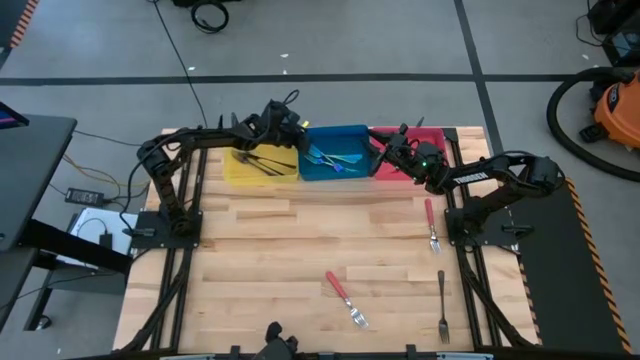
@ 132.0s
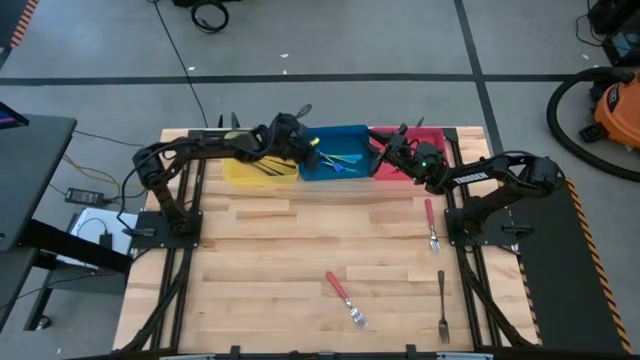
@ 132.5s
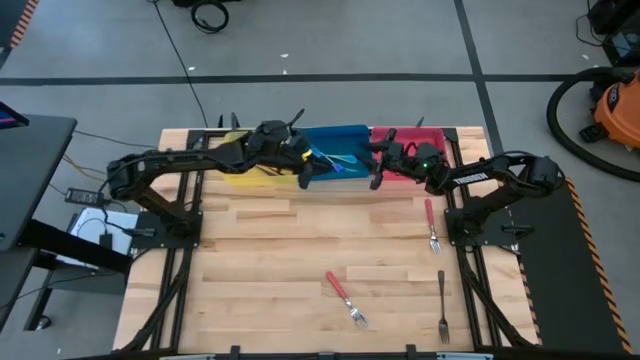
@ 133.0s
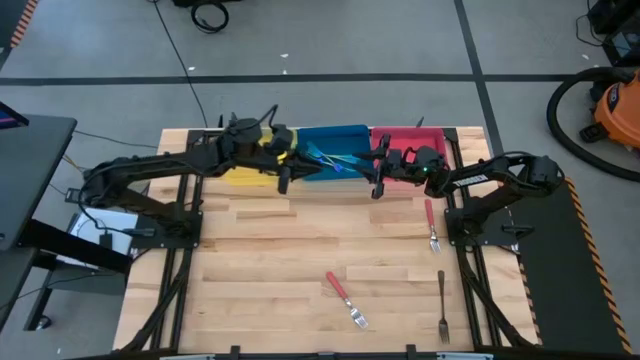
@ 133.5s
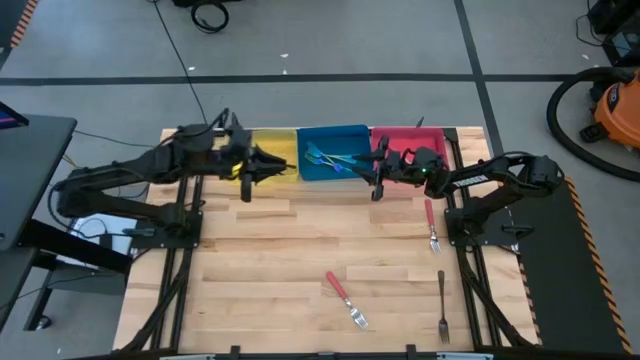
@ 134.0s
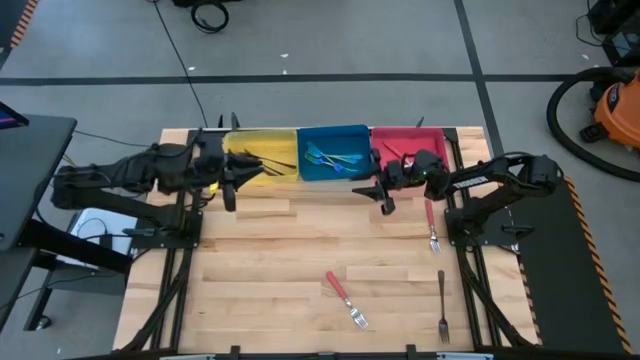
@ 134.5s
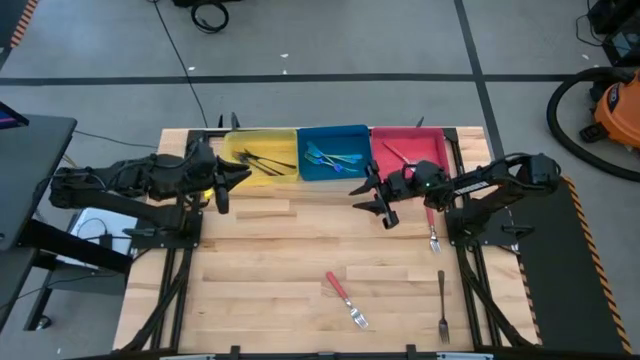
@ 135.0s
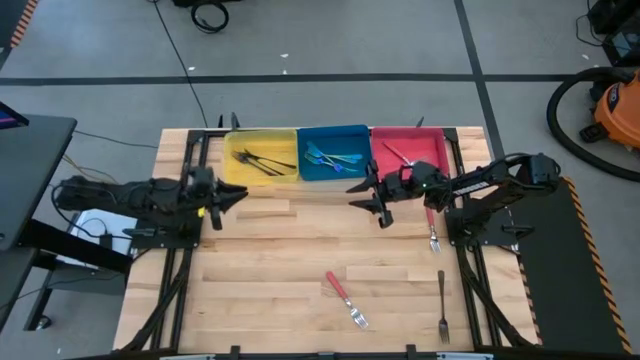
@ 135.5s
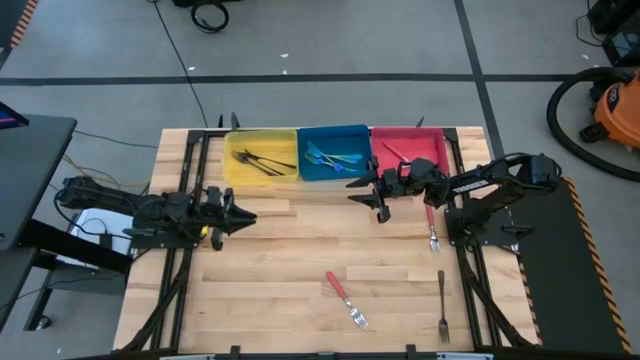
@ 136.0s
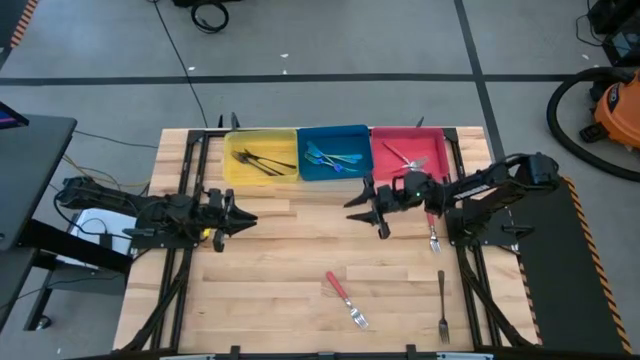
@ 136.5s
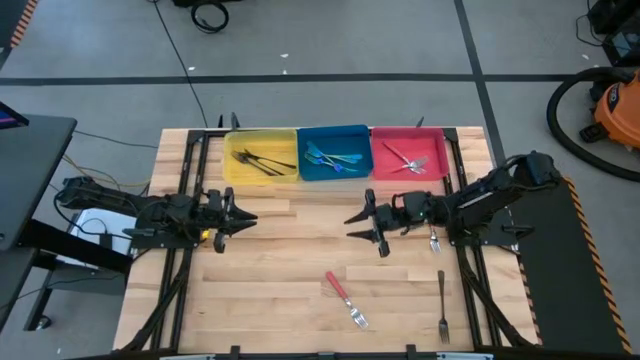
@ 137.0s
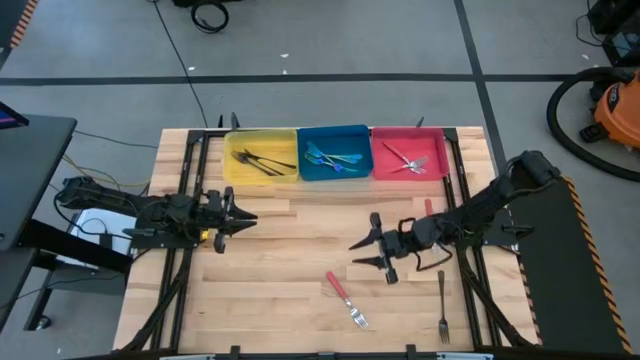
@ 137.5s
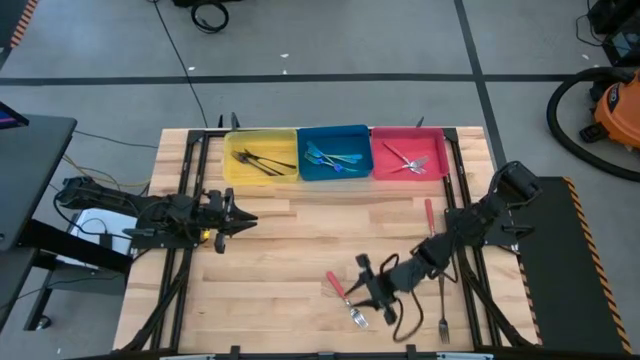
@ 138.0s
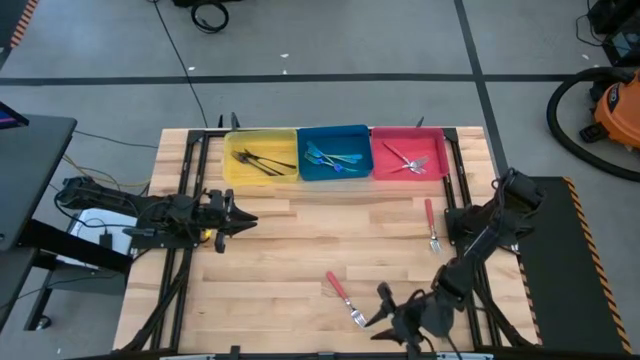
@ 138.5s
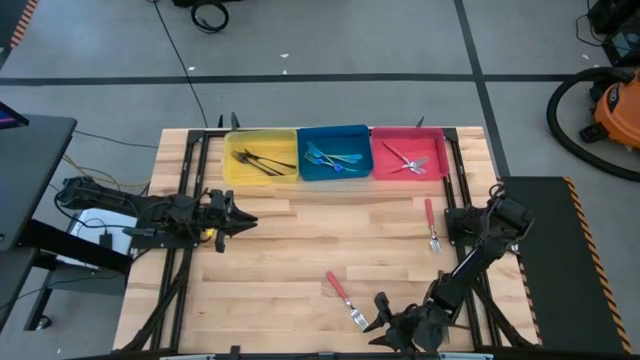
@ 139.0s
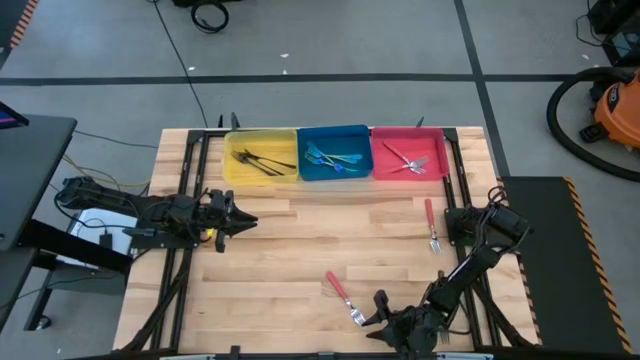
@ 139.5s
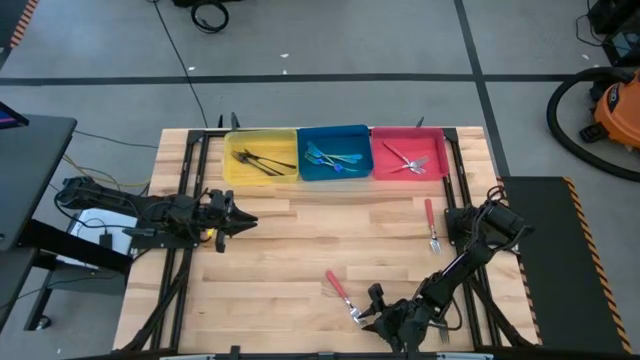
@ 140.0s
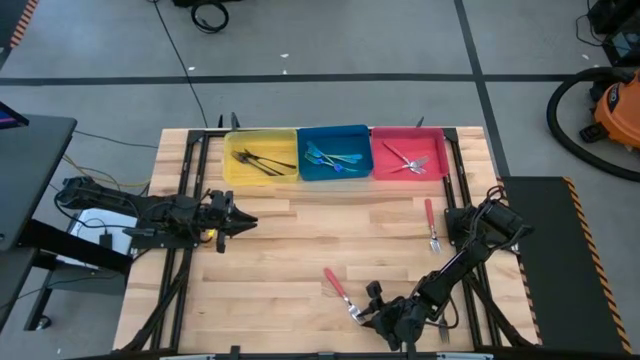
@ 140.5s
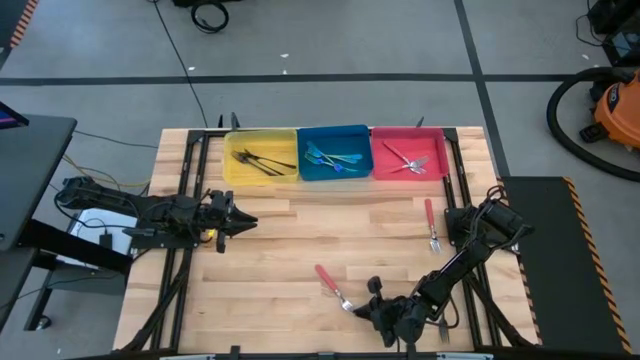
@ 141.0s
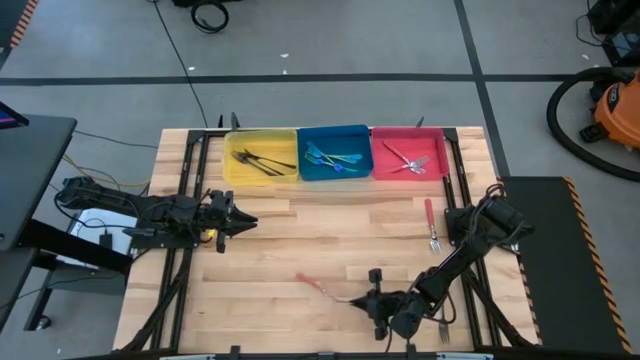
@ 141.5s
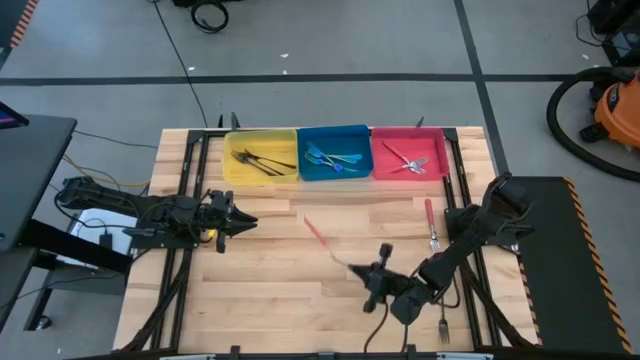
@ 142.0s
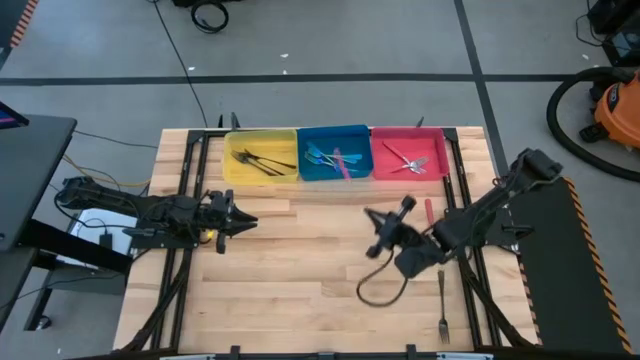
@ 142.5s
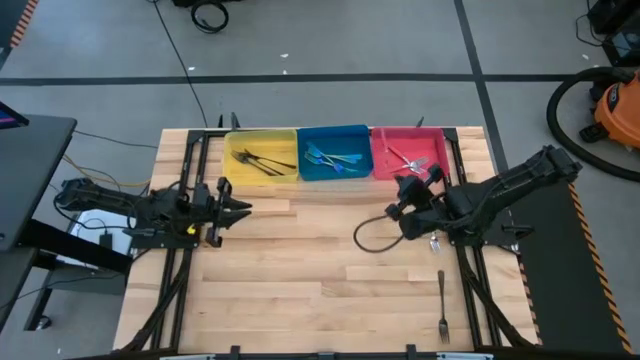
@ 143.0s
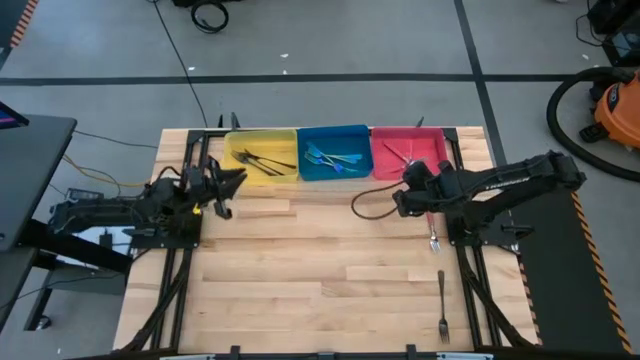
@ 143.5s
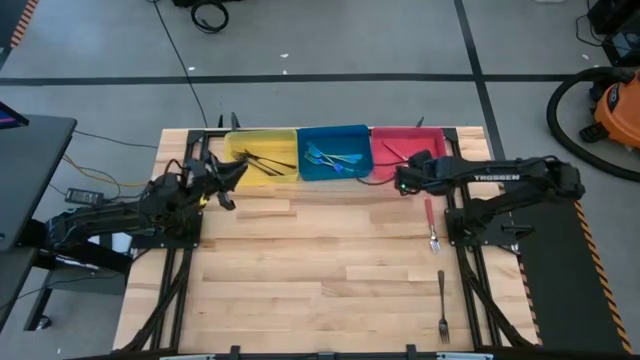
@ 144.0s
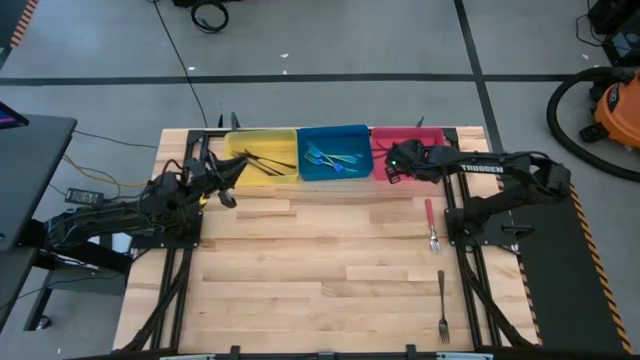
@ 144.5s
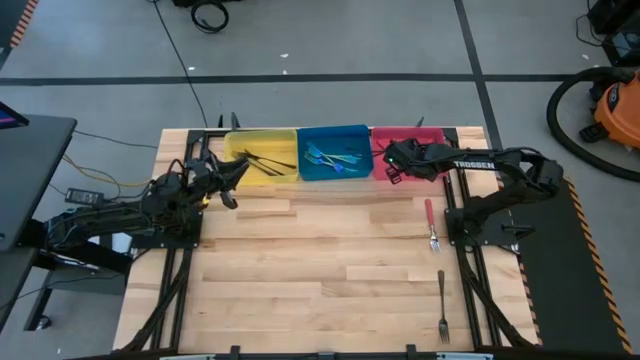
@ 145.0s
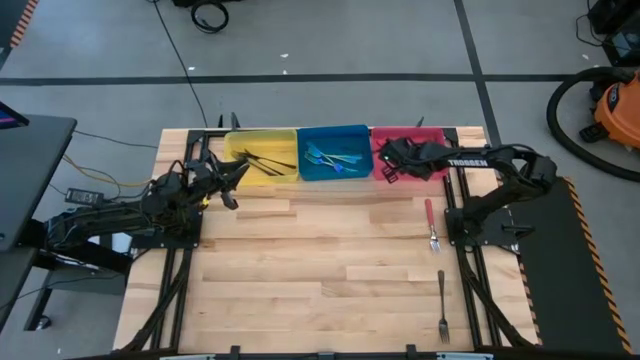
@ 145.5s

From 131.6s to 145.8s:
Task: Sort silverware by color (type)
Put the bottom pink fork into the red bin

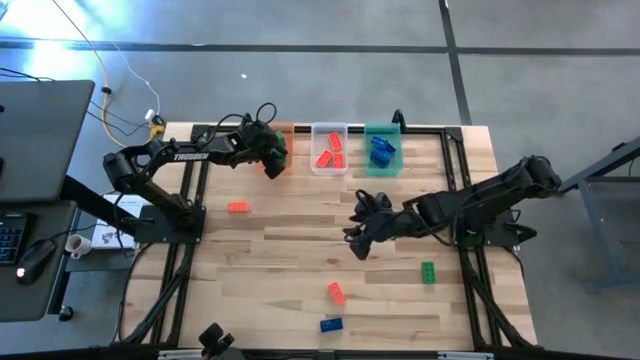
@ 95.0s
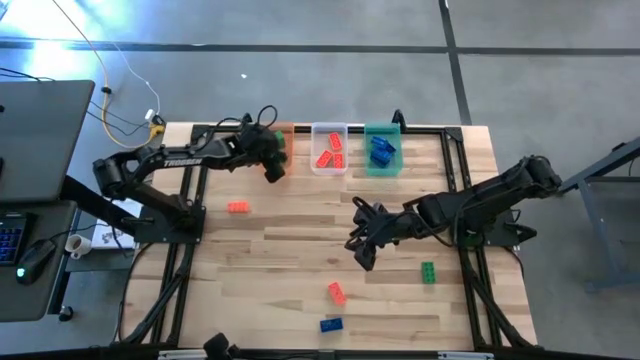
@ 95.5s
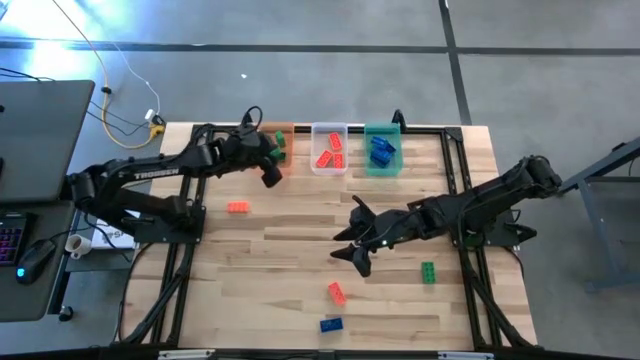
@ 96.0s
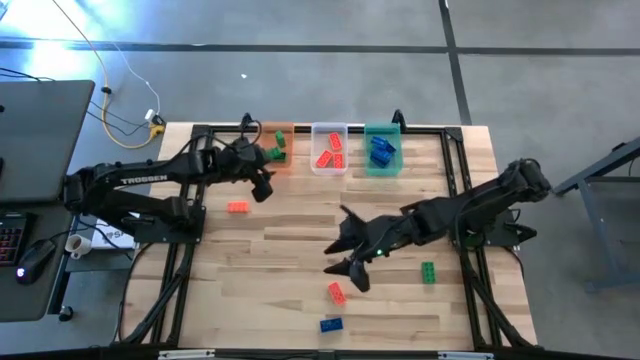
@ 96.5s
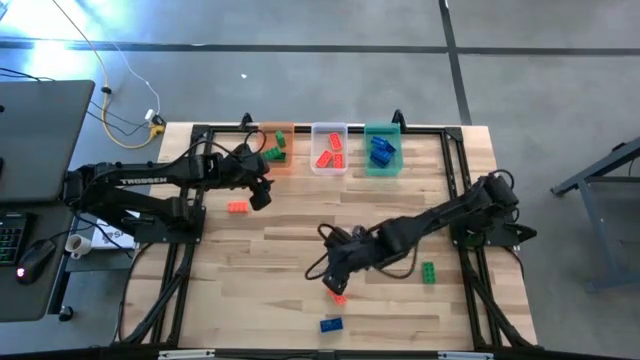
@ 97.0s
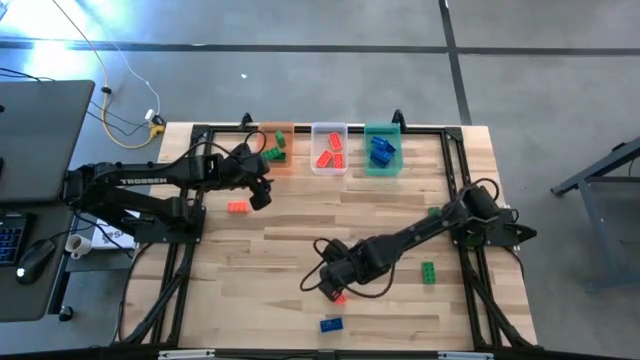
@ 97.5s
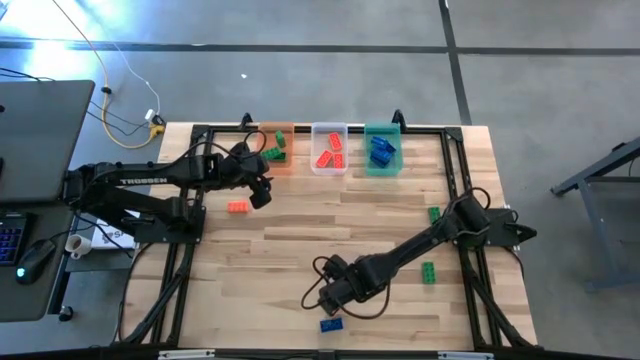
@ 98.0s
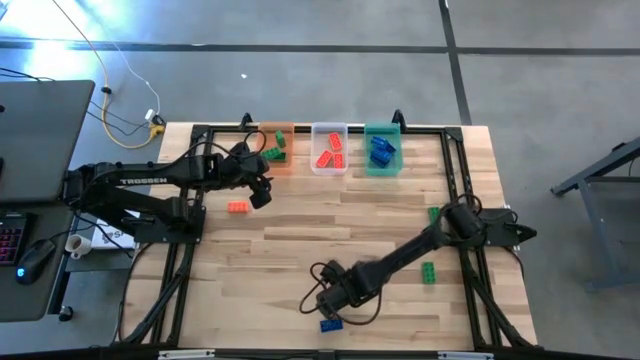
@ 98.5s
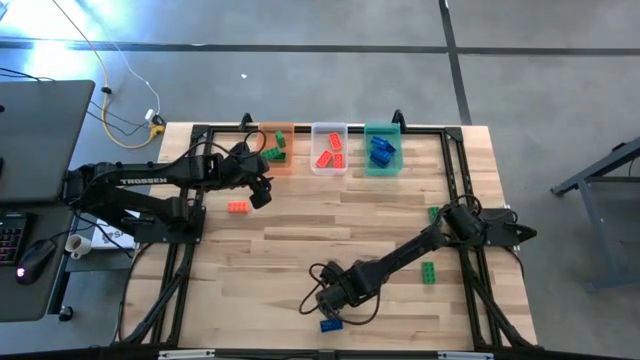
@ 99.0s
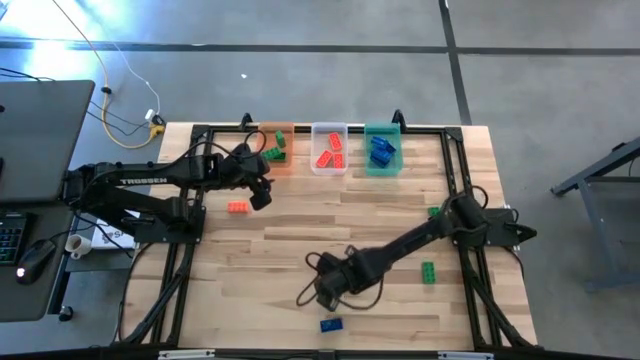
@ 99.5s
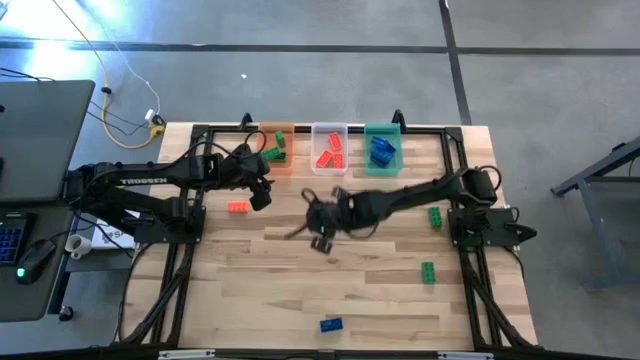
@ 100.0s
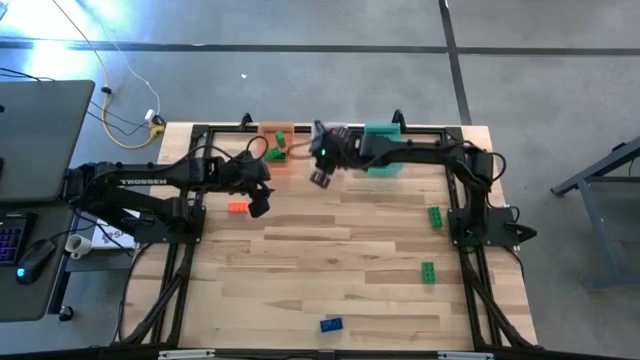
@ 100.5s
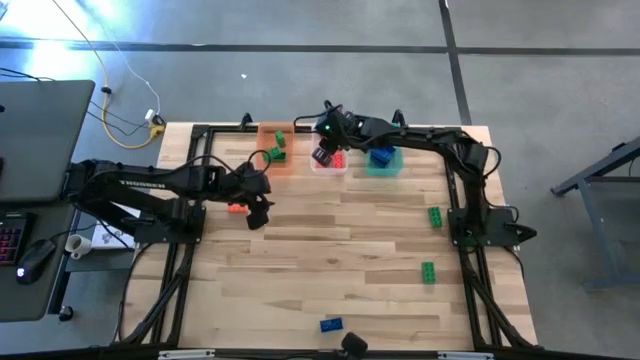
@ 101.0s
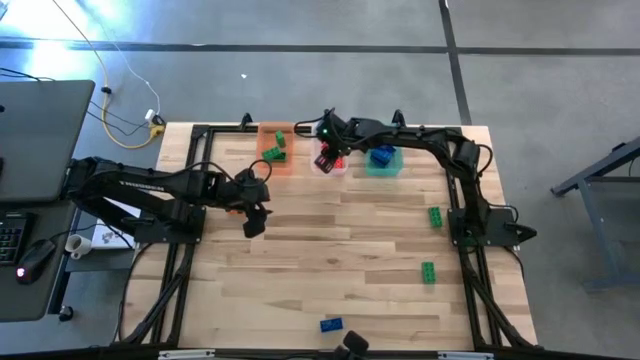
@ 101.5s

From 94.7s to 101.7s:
Task: Sort & place blocks by color
Put the orange game piece into the transparent bin
